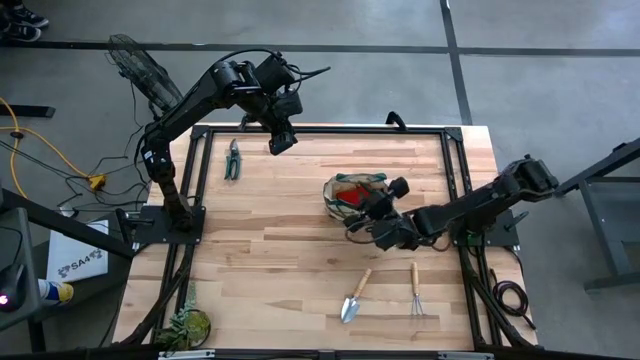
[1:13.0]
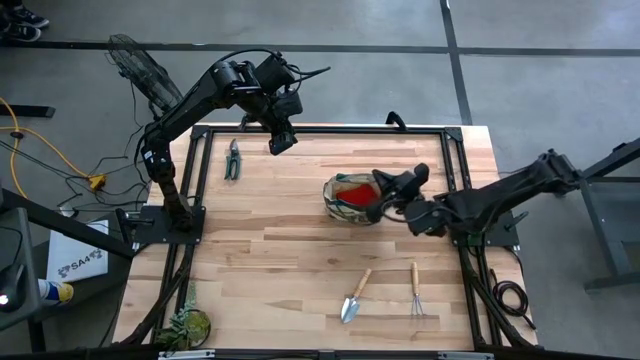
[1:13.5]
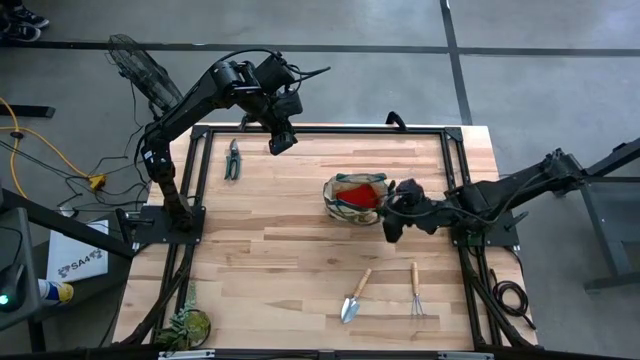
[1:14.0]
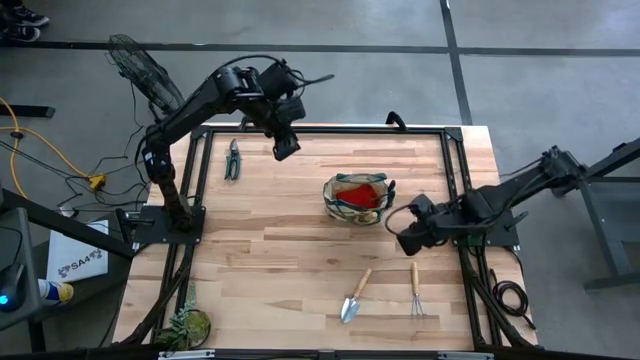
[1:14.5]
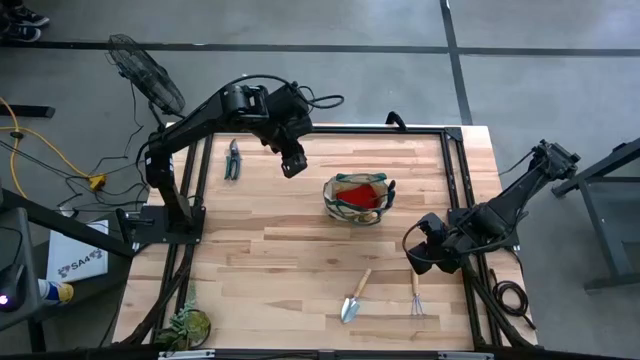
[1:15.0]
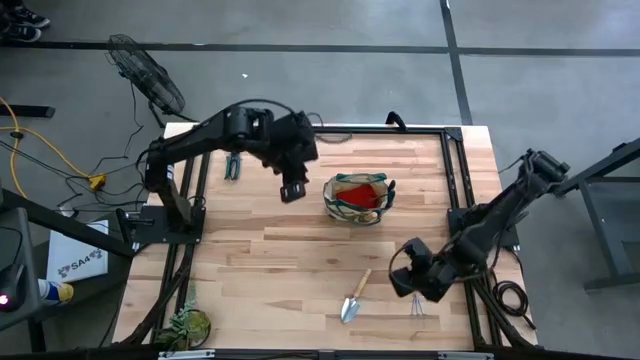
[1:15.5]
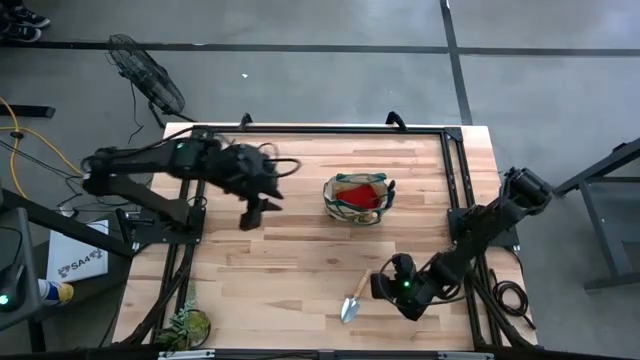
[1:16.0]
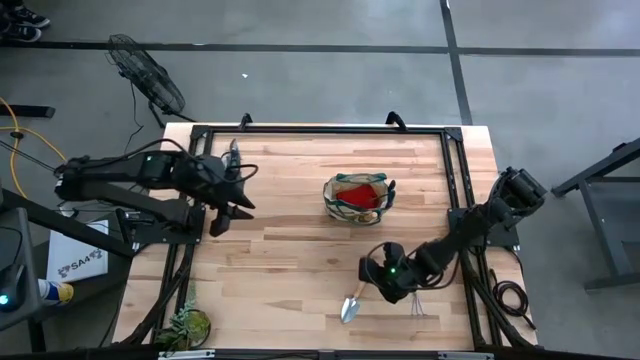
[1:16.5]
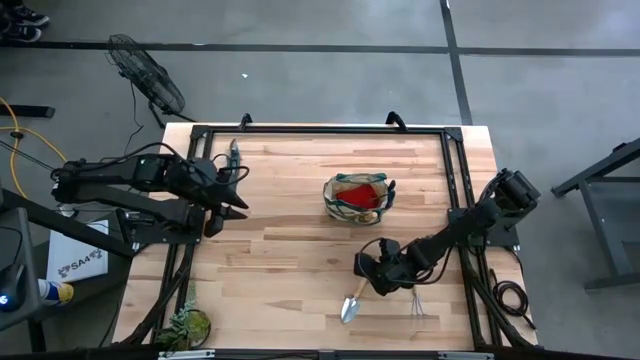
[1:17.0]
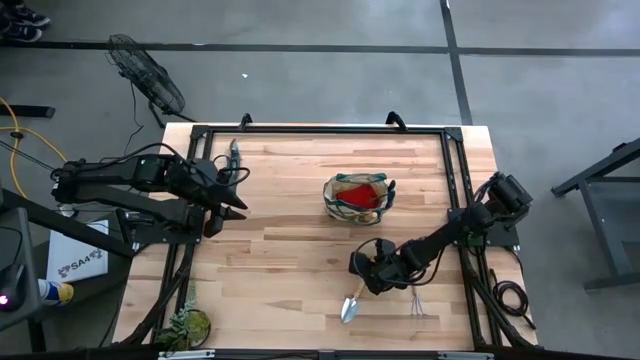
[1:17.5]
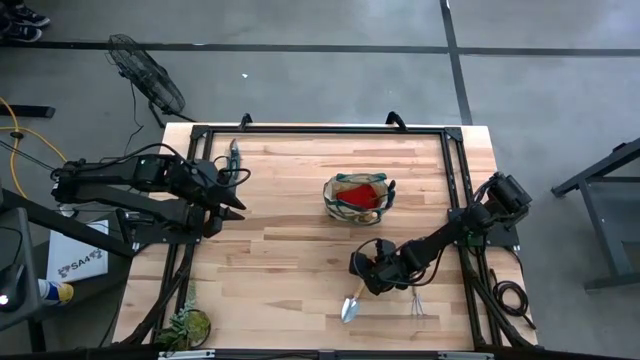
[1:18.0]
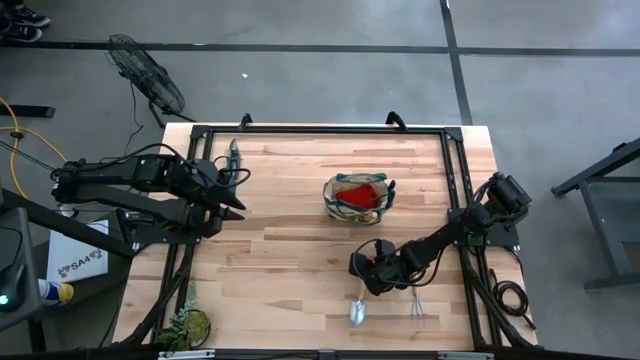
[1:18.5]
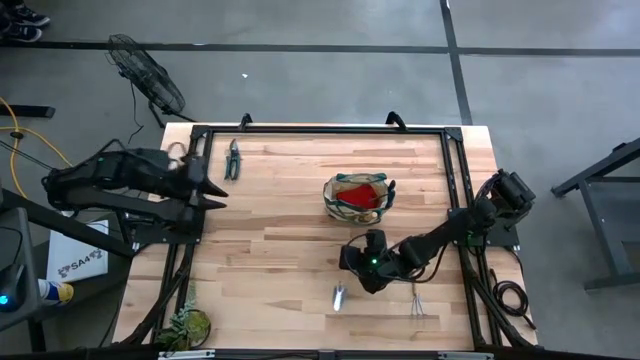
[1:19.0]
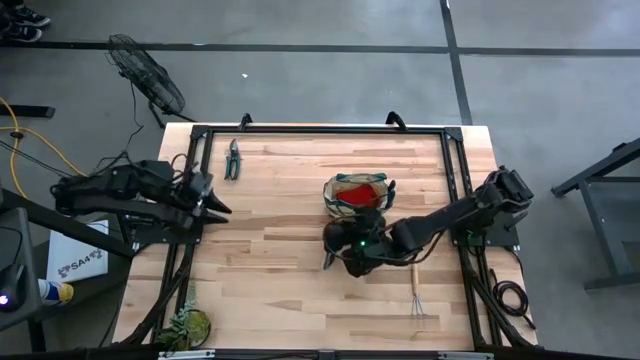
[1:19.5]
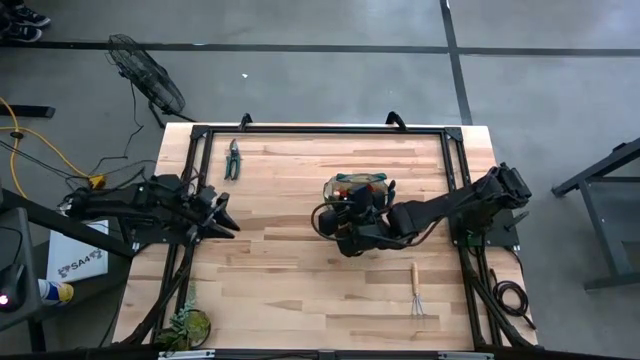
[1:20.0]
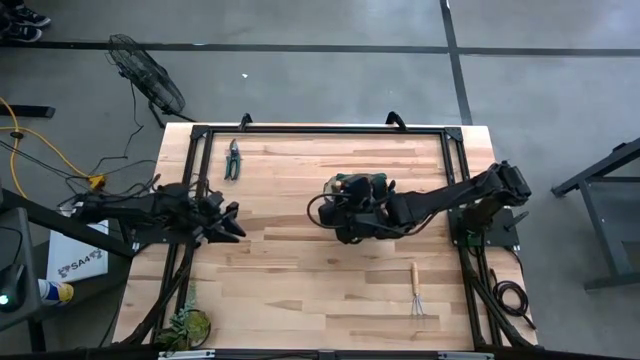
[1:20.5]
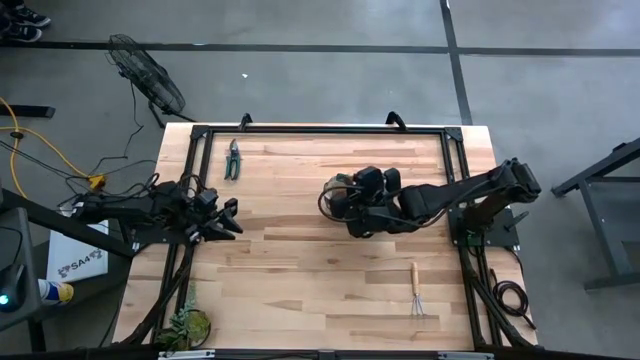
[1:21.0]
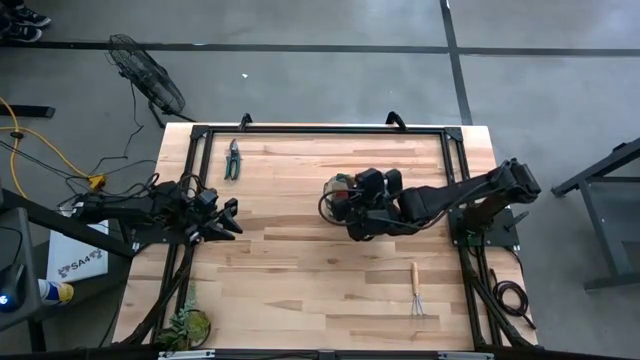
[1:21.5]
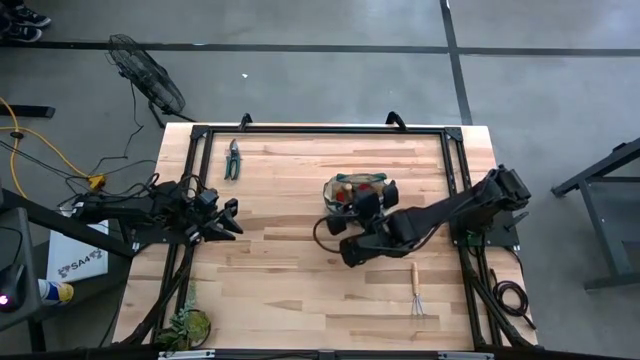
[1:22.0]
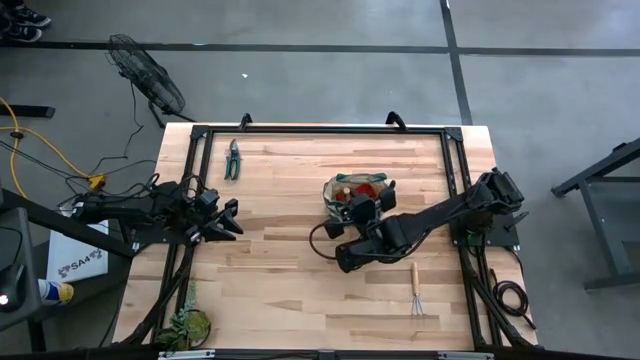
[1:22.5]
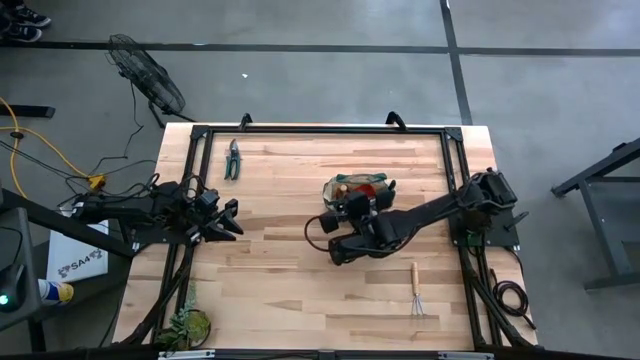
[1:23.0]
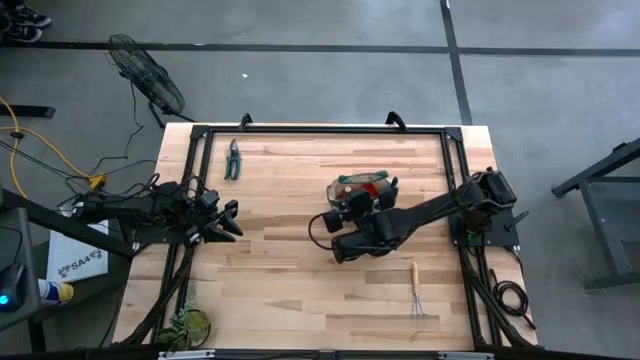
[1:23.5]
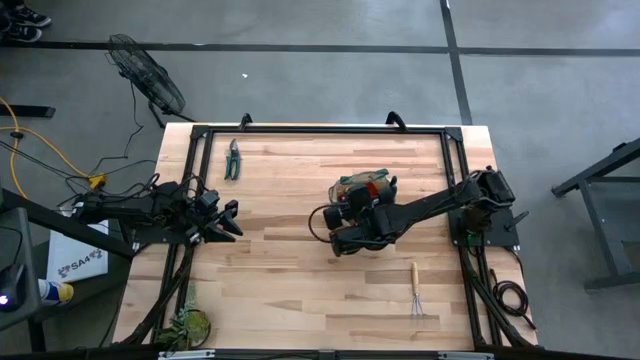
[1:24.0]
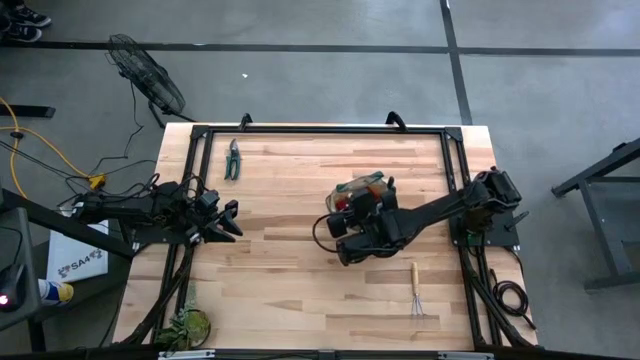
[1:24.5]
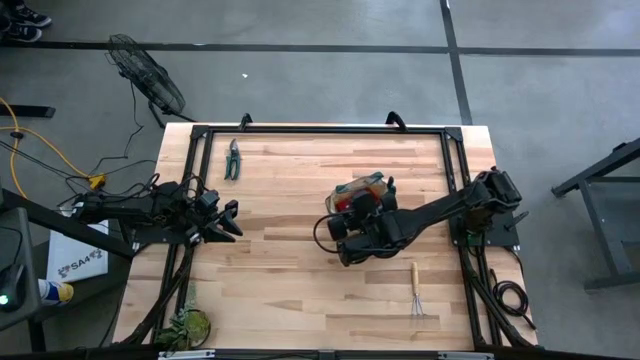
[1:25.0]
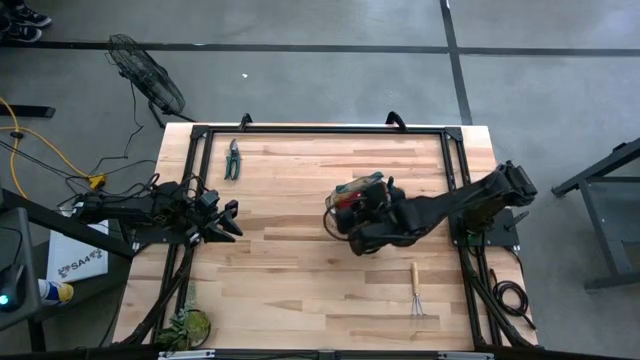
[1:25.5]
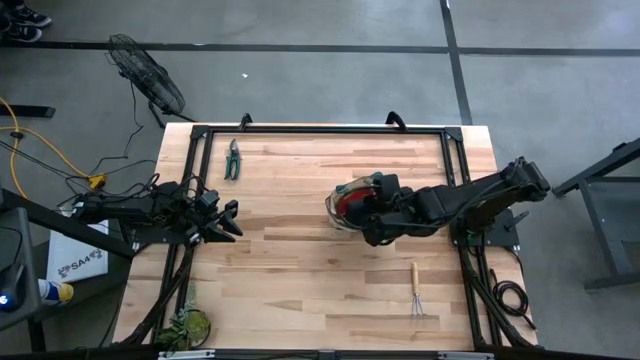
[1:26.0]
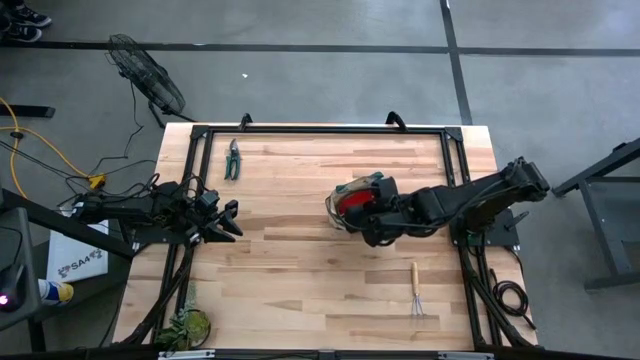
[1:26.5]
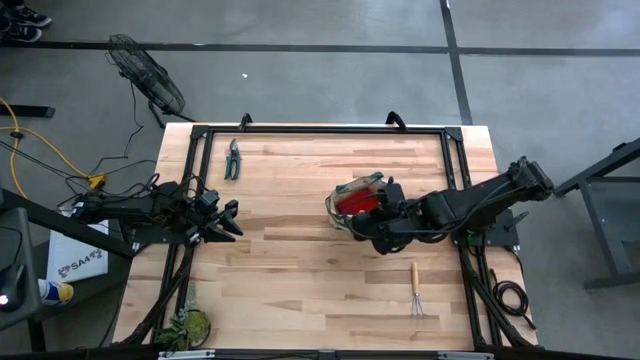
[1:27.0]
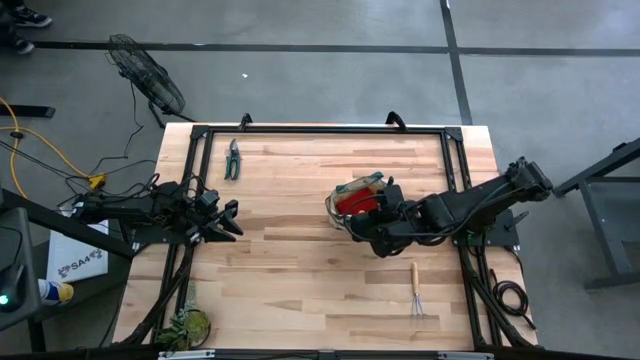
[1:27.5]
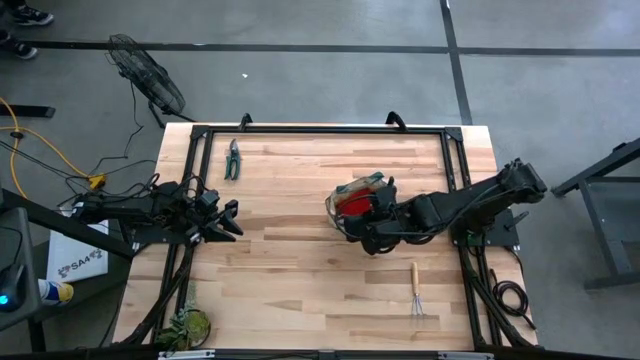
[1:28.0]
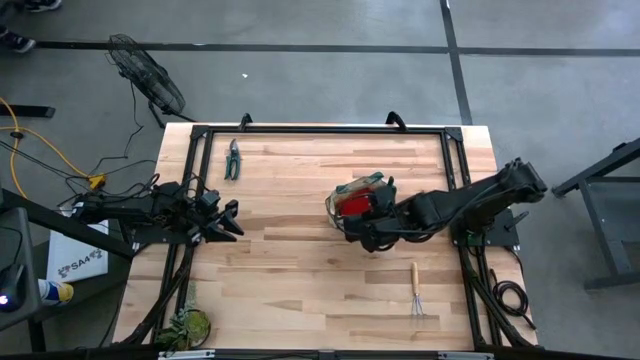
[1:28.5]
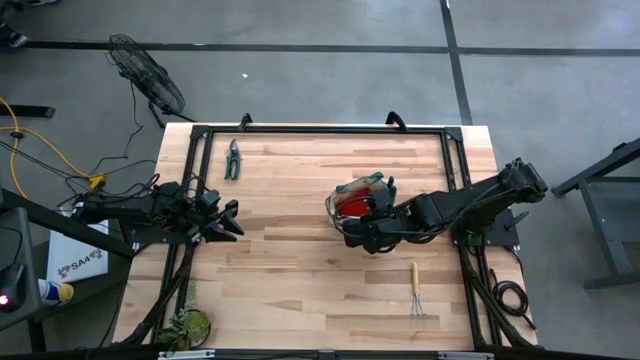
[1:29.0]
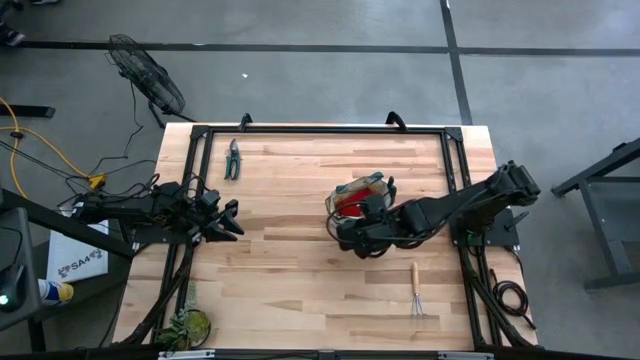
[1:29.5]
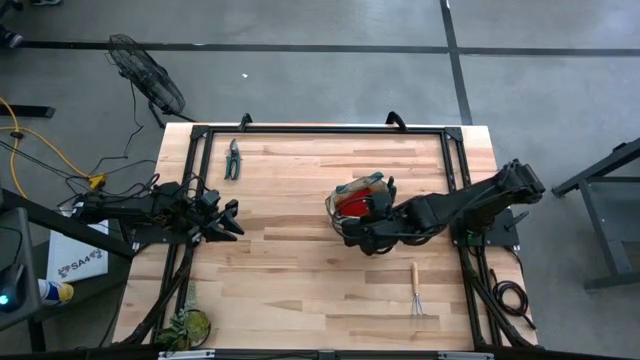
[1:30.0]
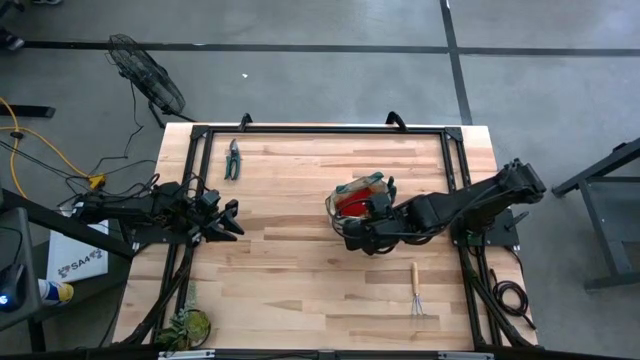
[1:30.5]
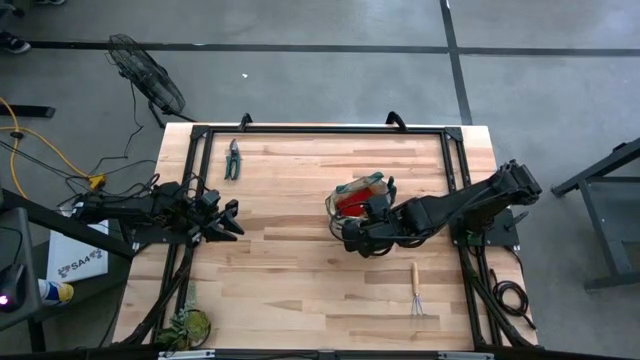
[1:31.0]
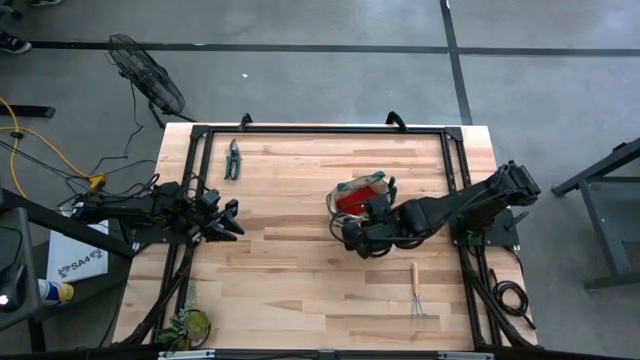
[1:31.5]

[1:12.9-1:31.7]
Task: Pick & Place Garden tools in Gardening bag
Put the trowel into the gardening bag

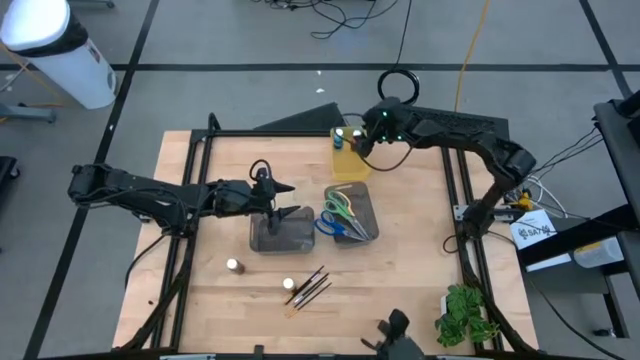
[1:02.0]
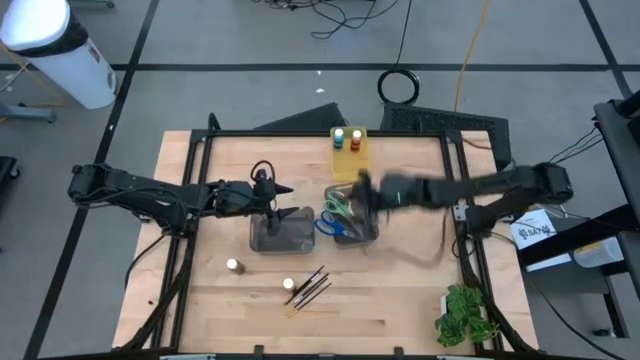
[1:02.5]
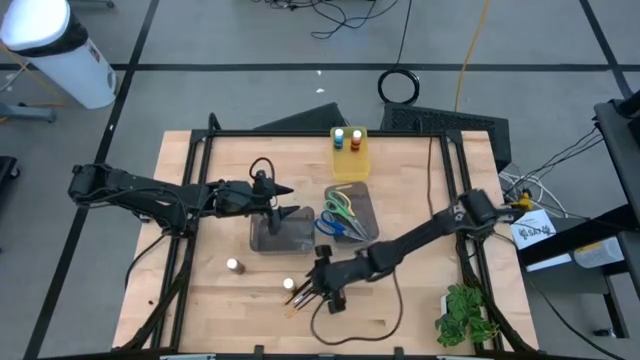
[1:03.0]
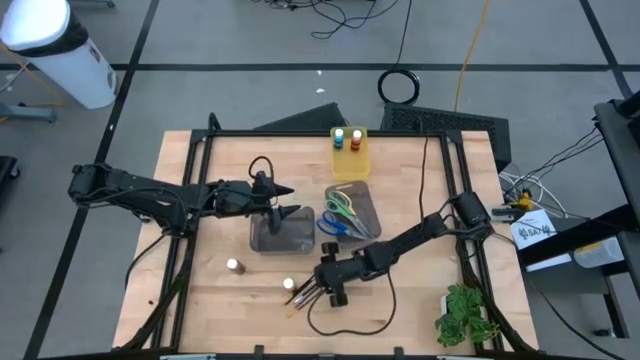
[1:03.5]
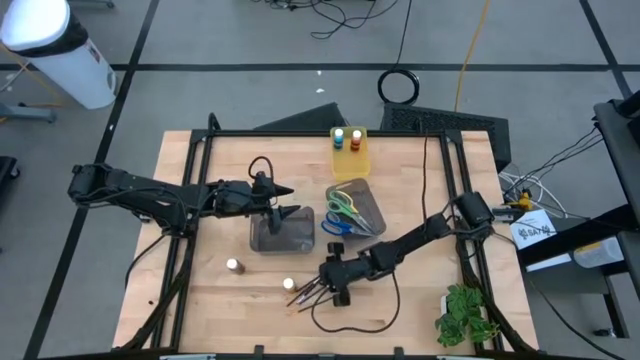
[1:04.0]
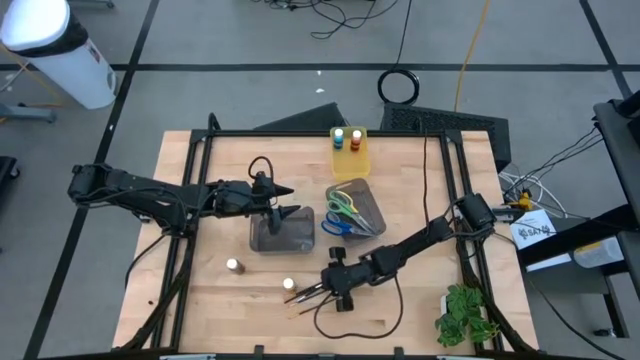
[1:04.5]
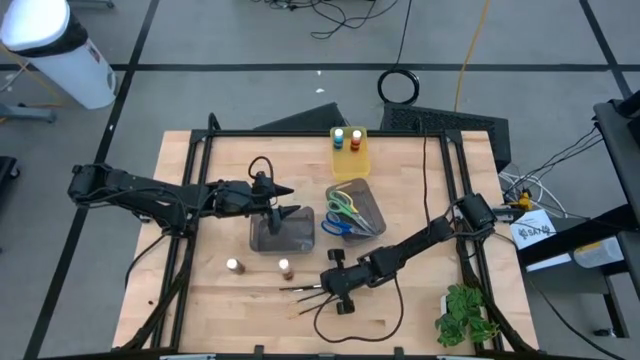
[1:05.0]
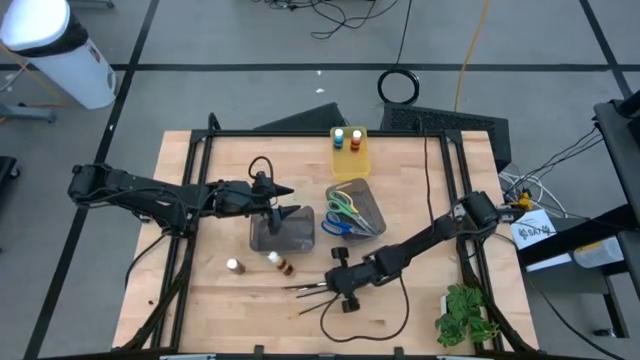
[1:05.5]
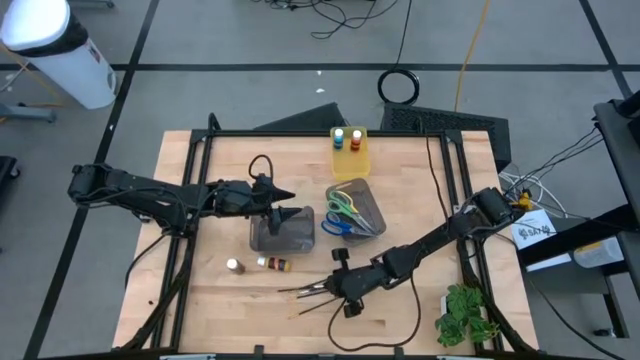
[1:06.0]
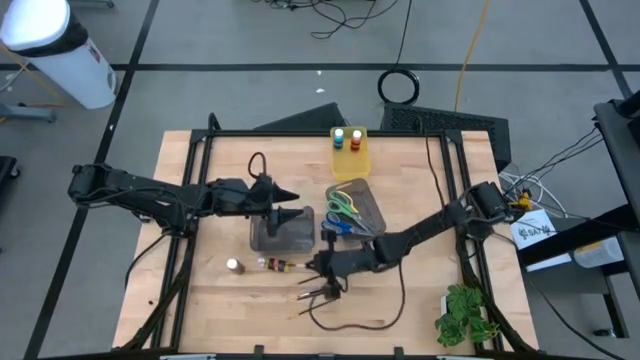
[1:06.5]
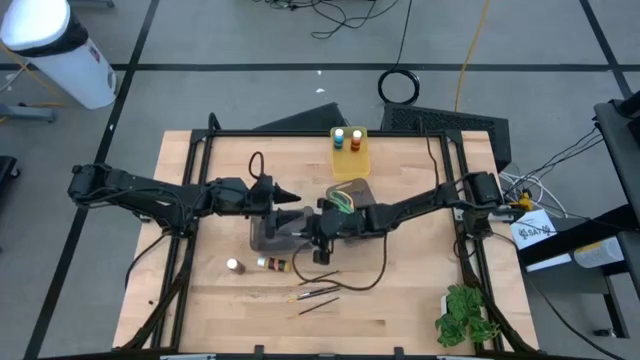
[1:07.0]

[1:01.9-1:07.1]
Task: Pick & Place Paint Supplies
Put the top silver paint brush into the left black bin
